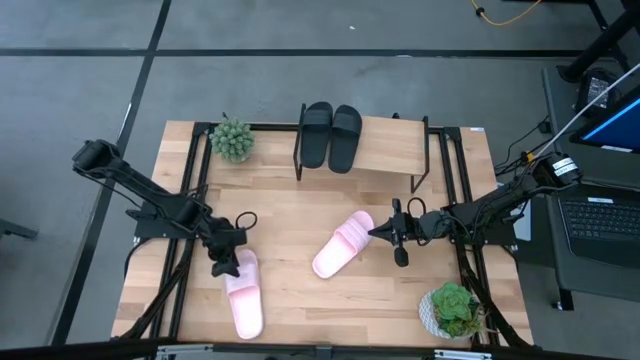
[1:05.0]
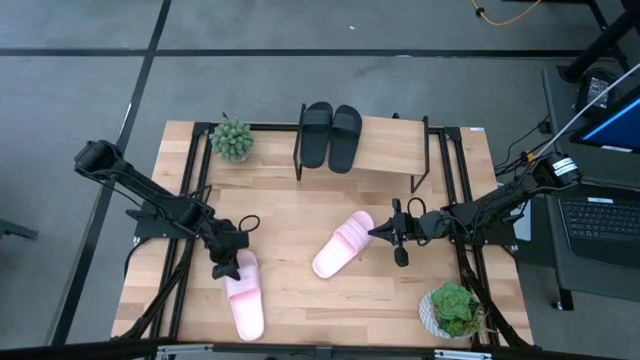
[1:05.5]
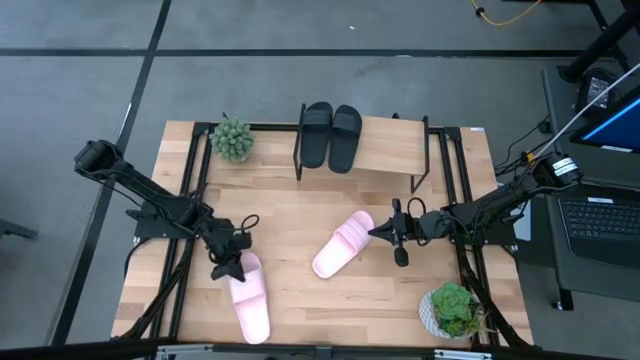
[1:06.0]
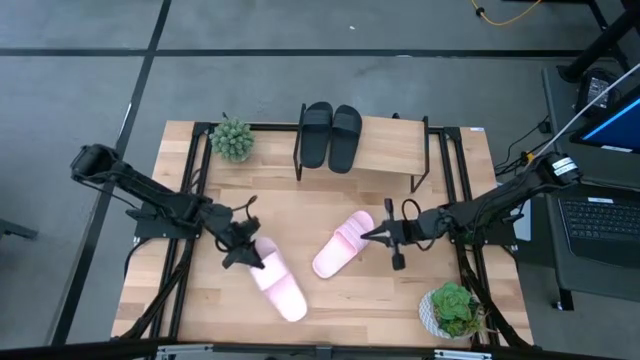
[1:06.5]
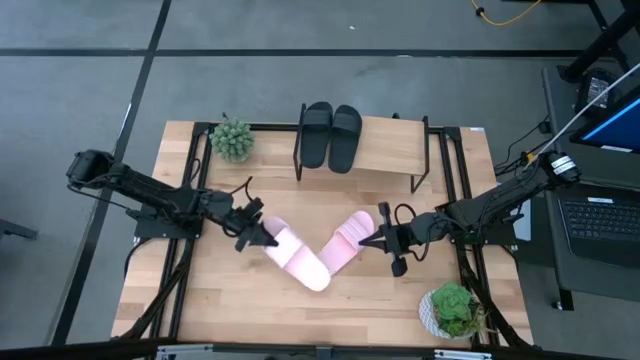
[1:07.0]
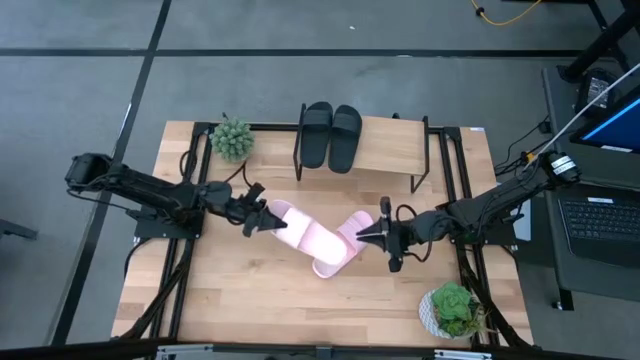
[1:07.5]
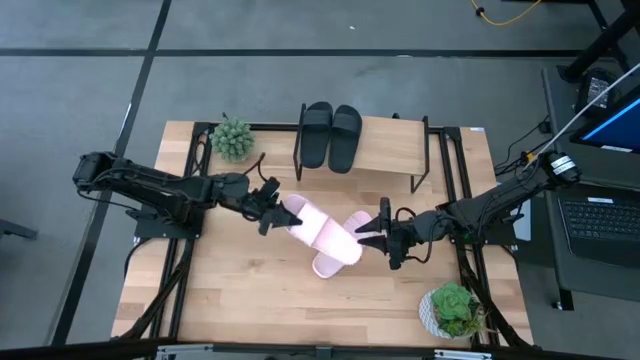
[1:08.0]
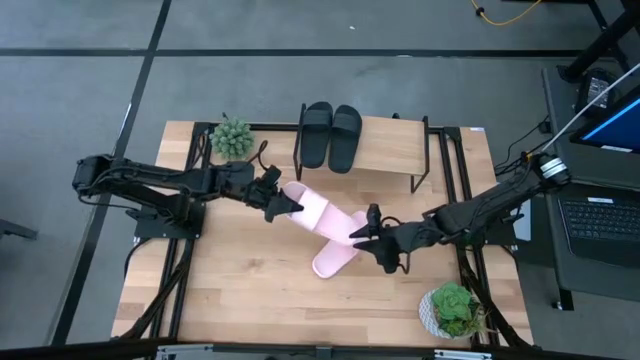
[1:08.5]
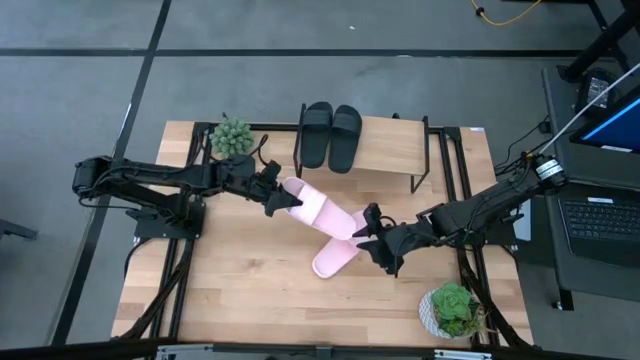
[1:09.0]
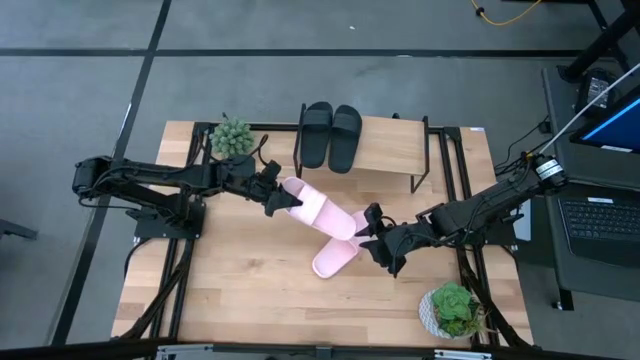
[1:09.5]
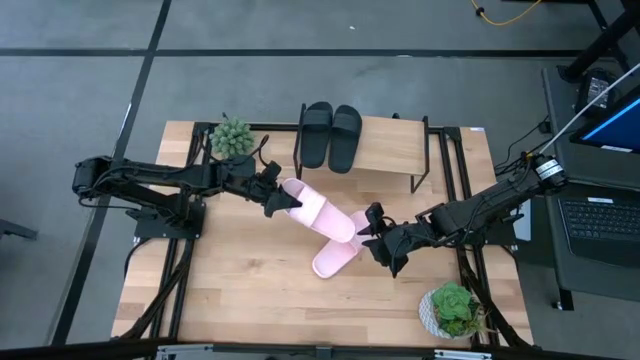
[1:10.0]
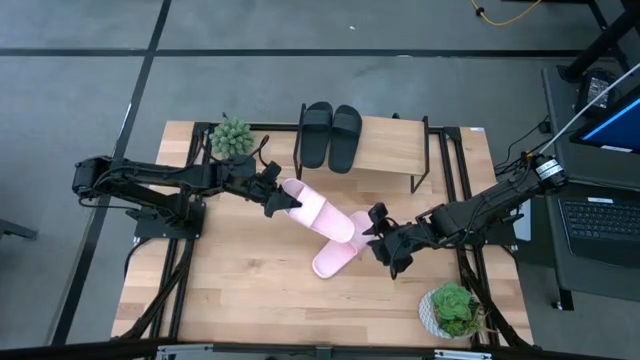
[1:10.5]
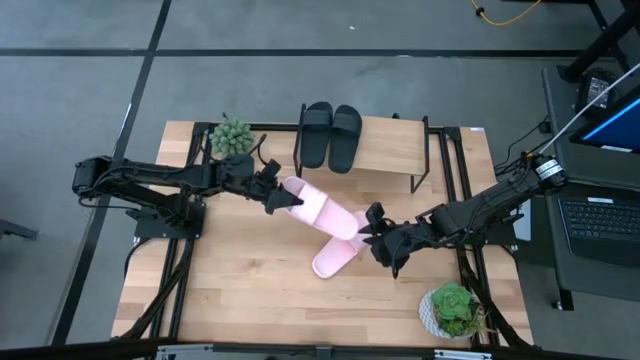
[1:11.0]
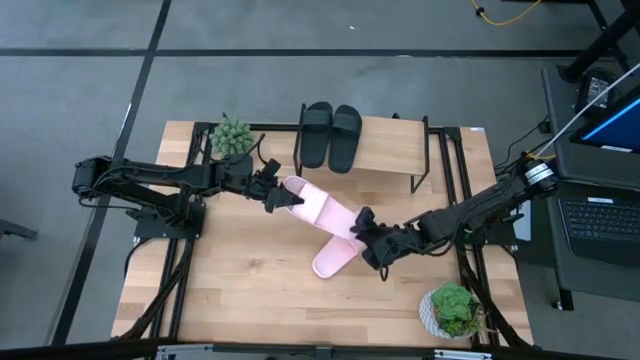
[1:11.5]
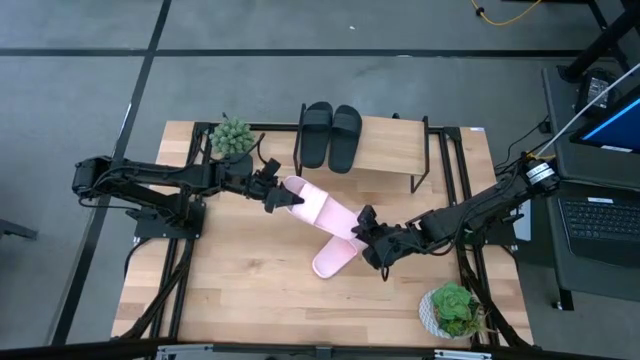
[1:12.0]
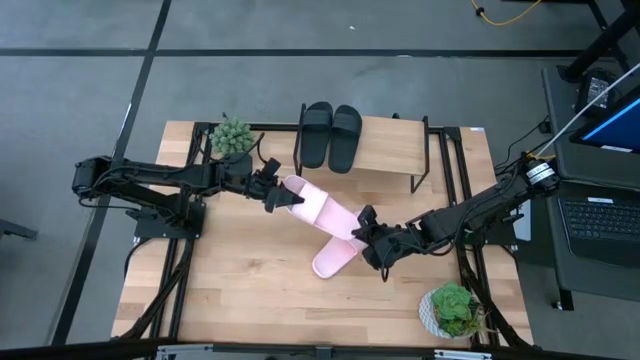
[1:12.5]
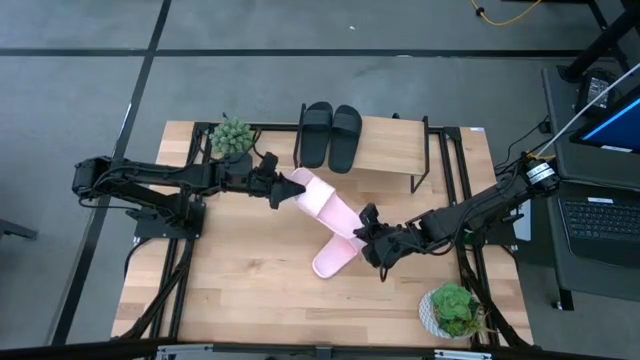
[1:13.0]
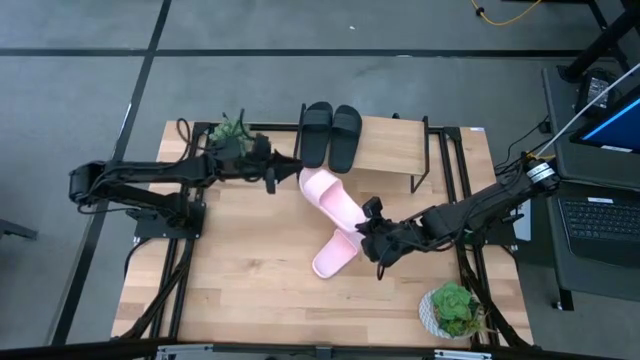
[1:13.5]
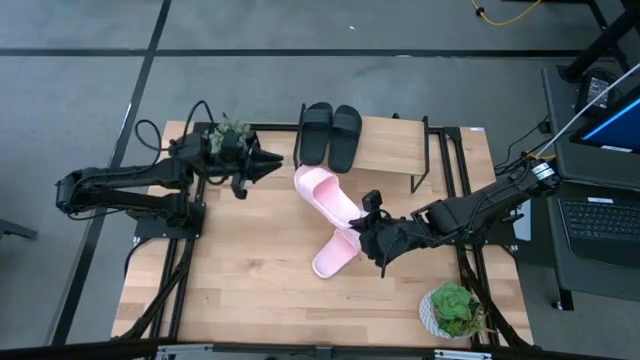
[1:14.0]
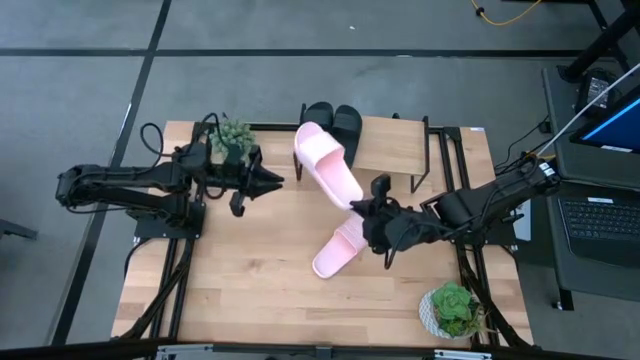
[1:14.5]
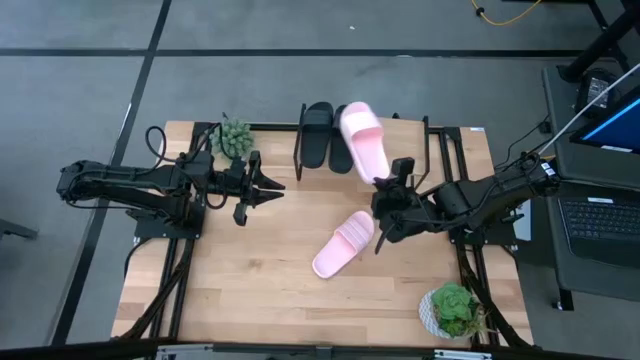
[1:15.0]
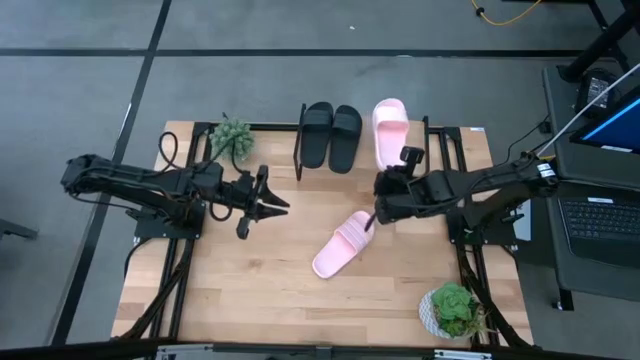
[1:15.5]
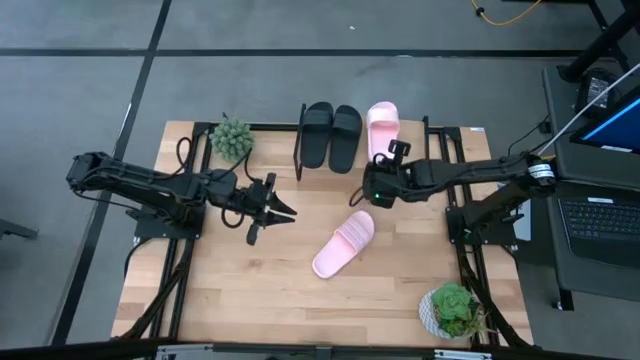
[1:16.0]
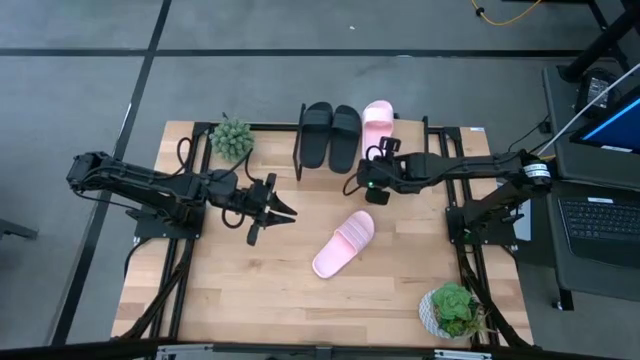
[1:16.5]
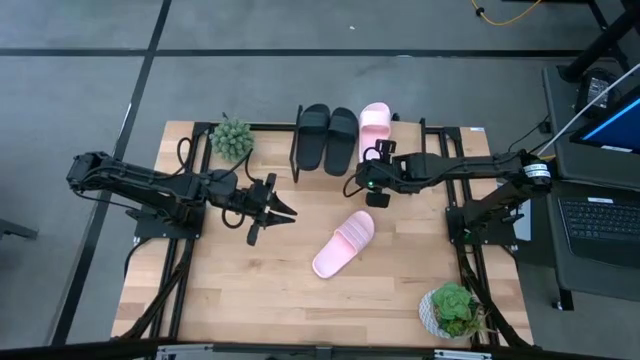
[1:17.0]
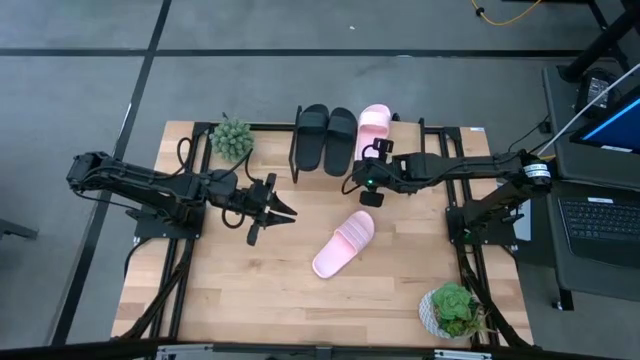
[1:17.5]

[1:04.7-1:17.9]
Task: Pick and place slides into the shelf
Put the left pink slide on the shelf
